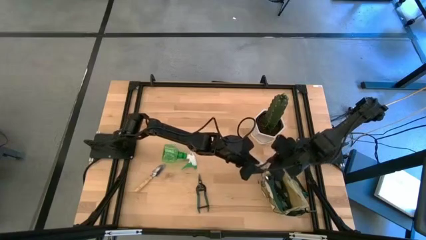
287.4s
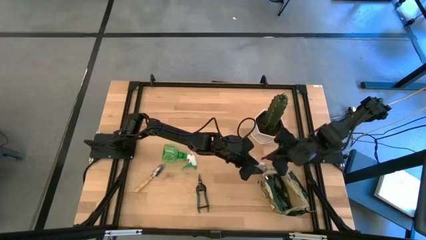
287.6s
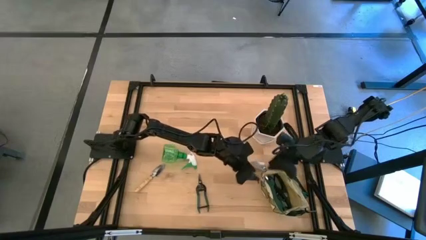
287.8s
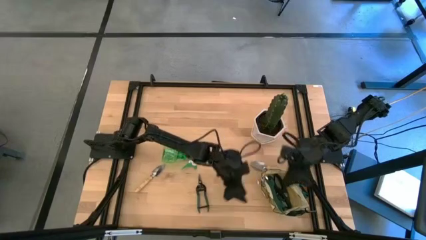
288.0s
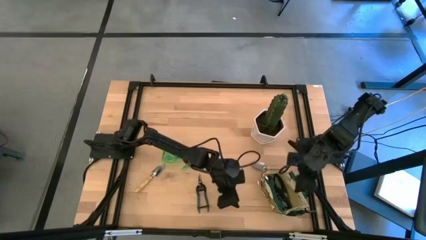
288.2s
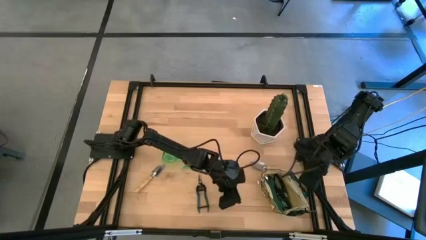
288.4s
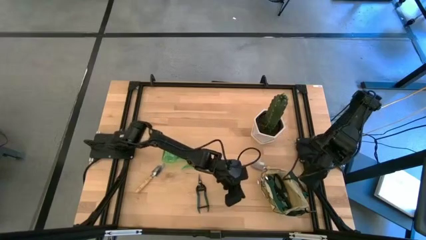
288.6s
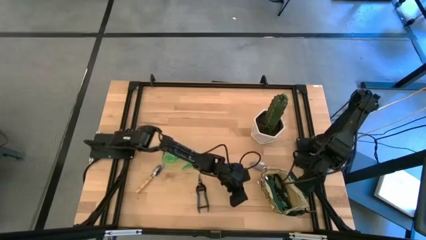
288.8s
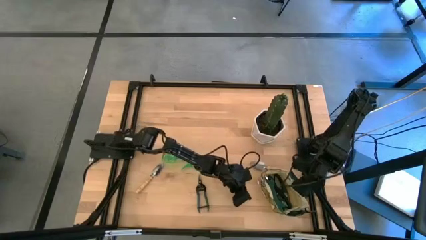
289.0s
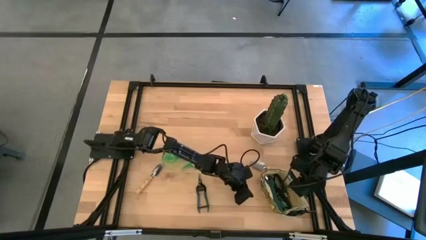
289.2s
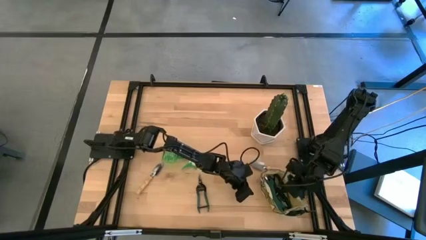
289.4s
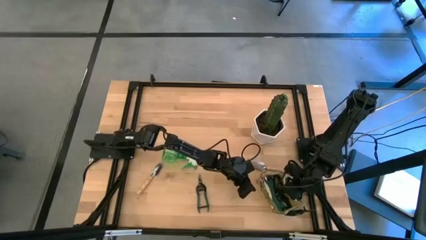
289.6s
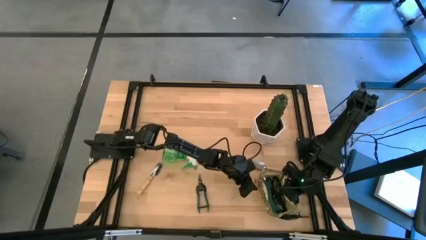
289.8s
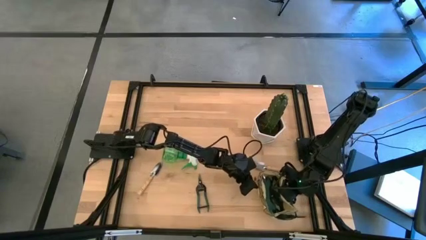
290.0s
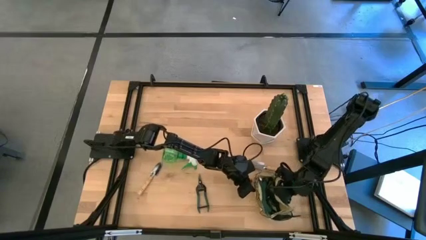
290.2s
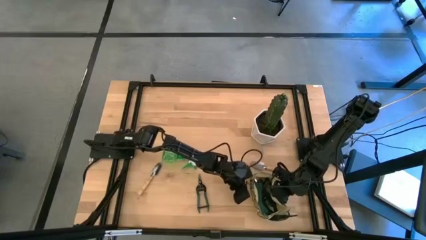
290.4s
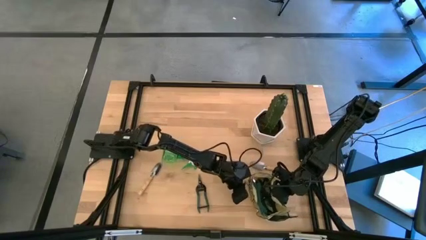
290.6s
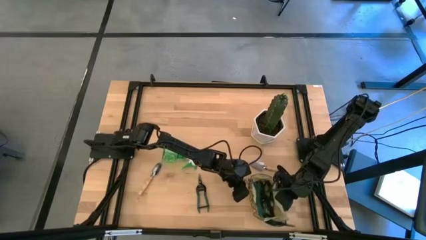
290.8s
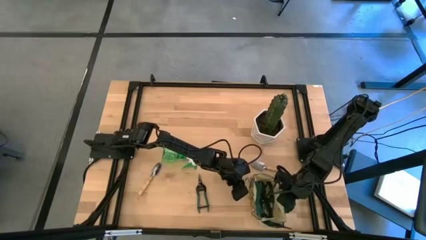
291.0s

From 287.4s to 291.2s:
Task: Pick & Place Garden tools in Gardening bag
Adjust the white bag

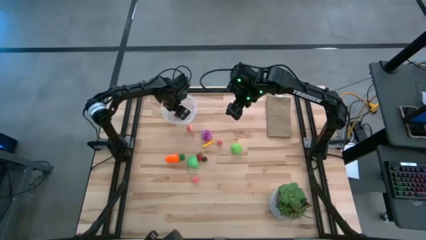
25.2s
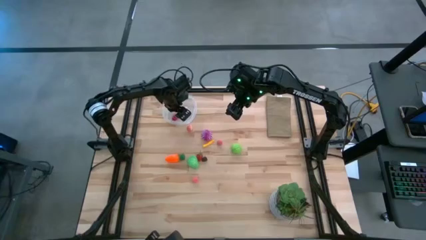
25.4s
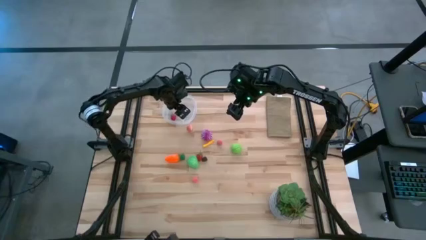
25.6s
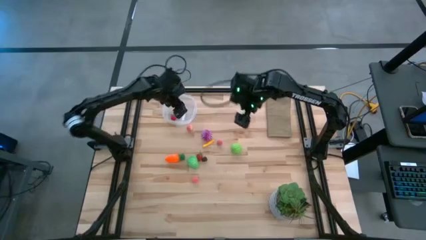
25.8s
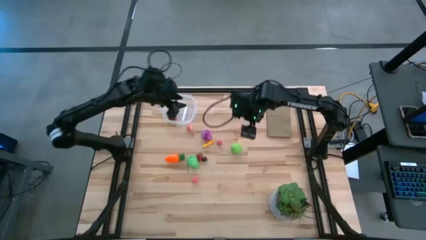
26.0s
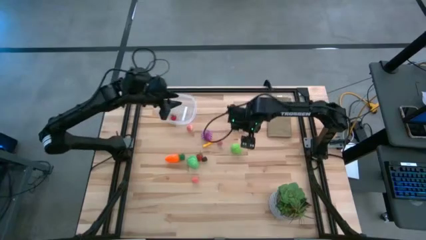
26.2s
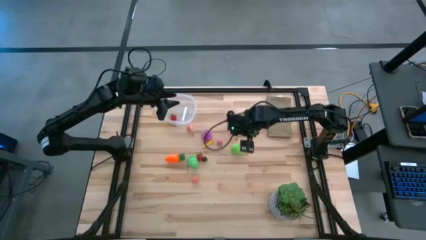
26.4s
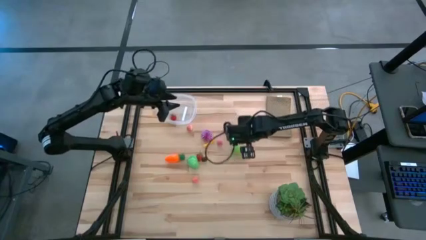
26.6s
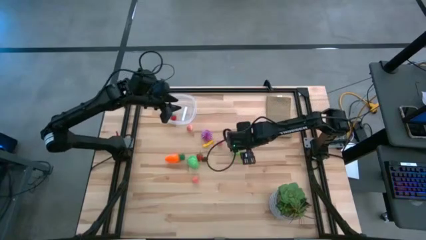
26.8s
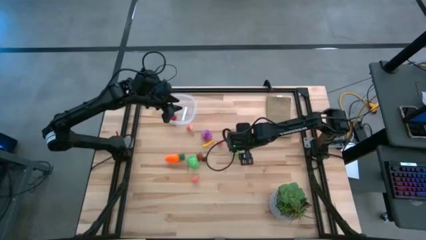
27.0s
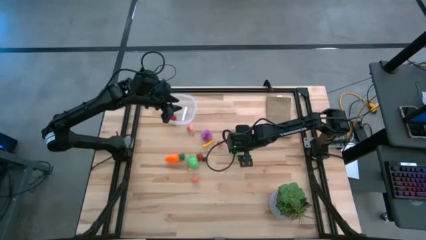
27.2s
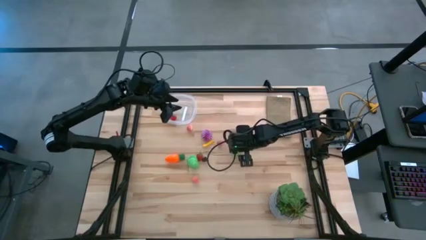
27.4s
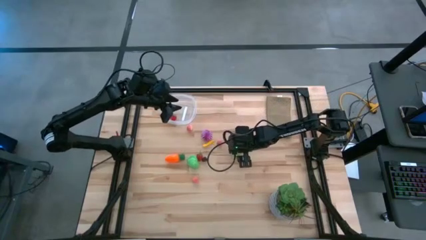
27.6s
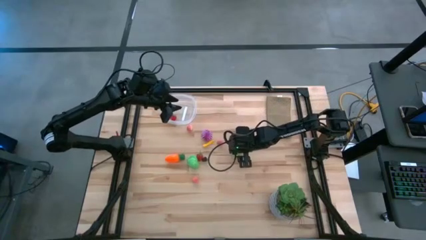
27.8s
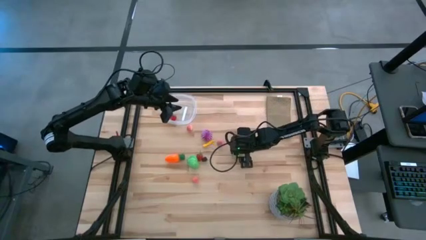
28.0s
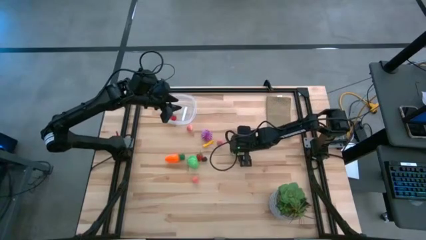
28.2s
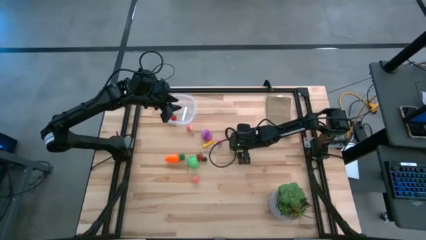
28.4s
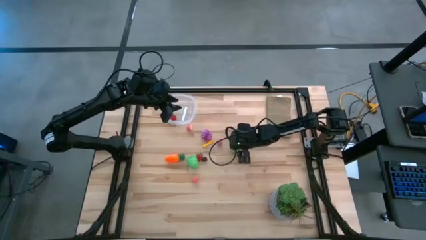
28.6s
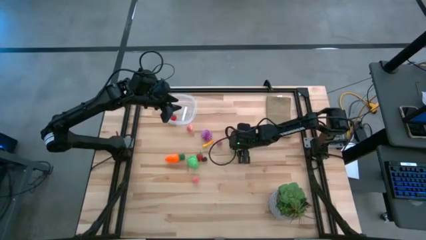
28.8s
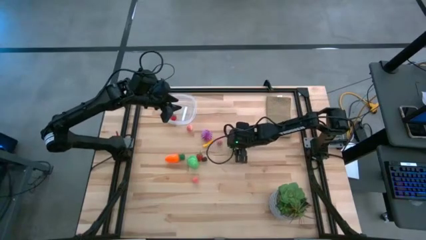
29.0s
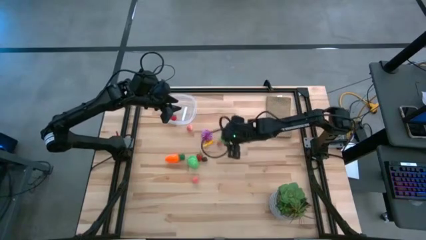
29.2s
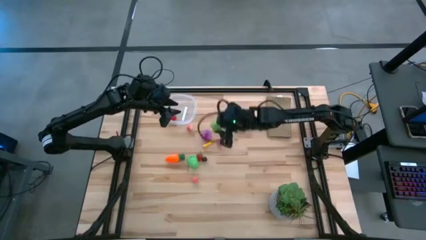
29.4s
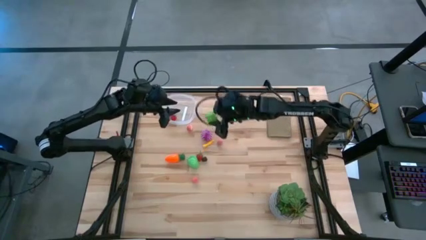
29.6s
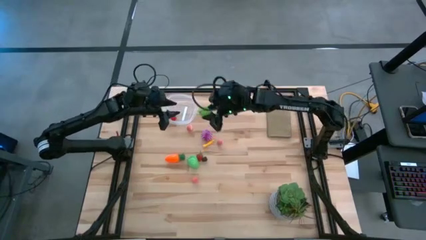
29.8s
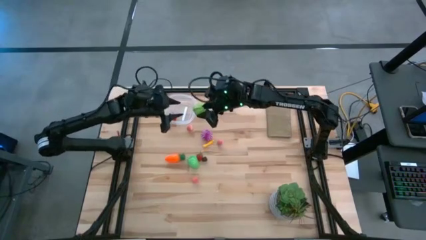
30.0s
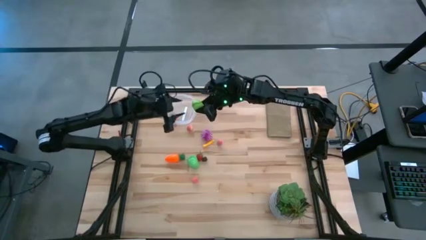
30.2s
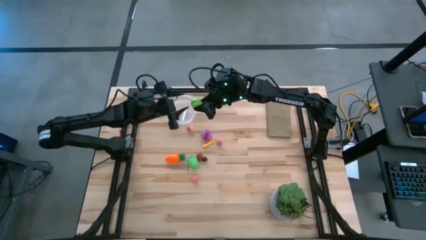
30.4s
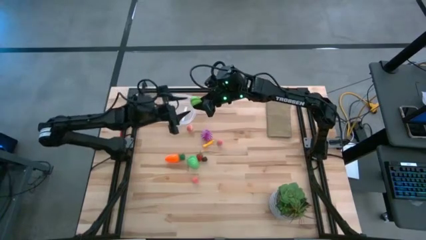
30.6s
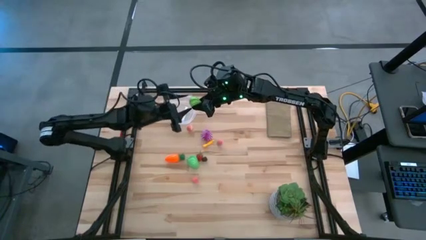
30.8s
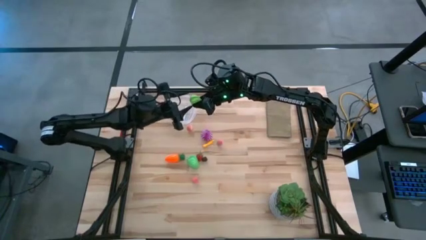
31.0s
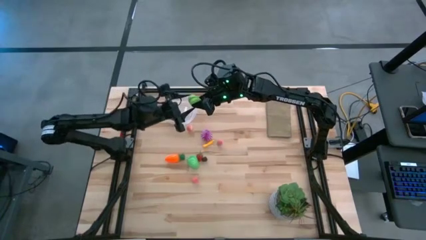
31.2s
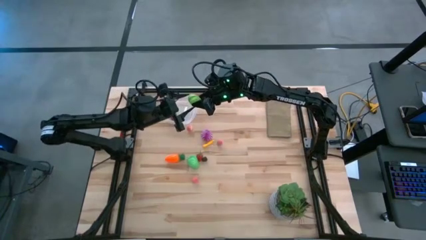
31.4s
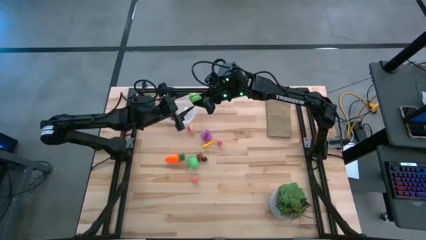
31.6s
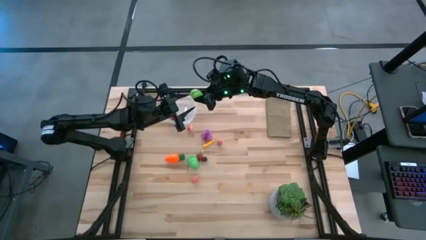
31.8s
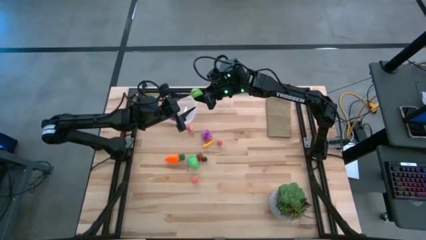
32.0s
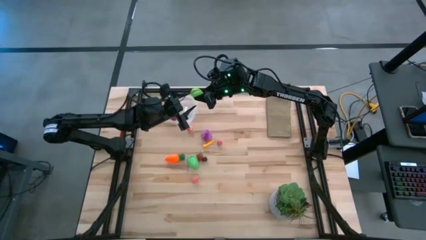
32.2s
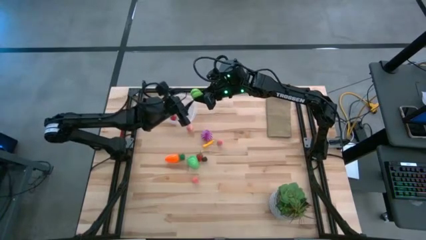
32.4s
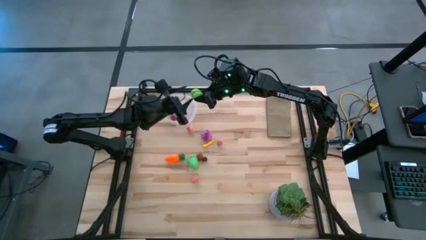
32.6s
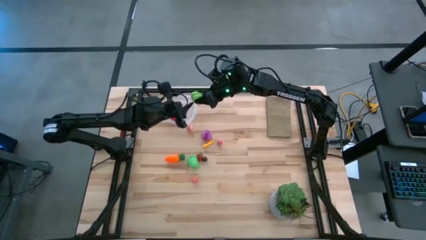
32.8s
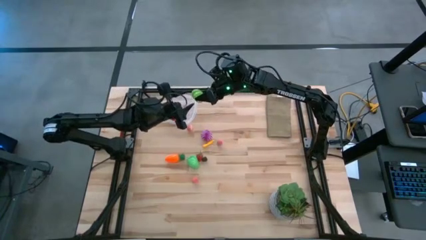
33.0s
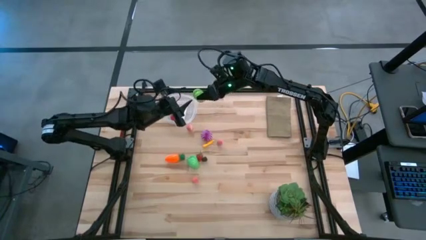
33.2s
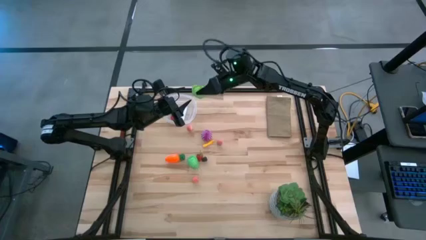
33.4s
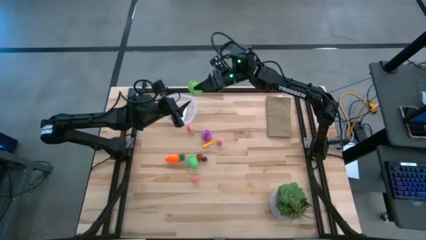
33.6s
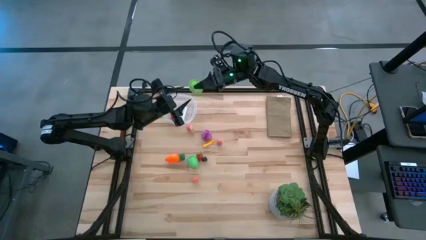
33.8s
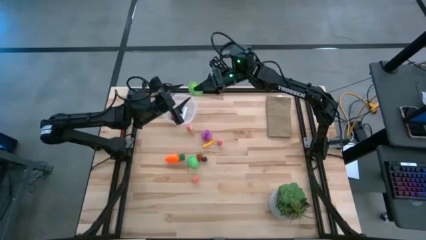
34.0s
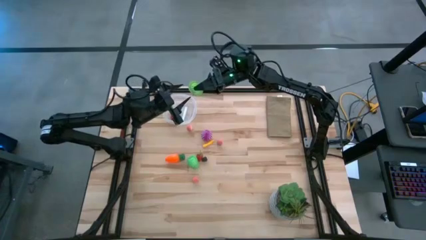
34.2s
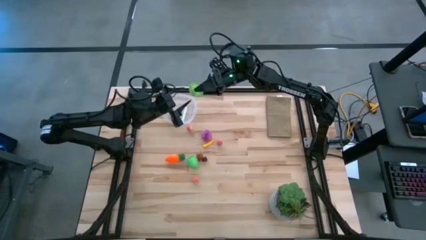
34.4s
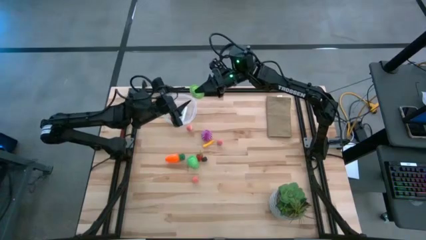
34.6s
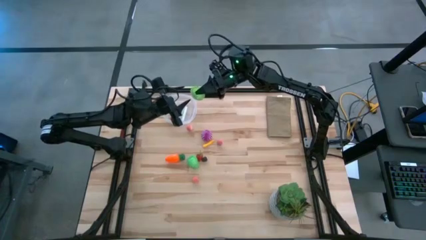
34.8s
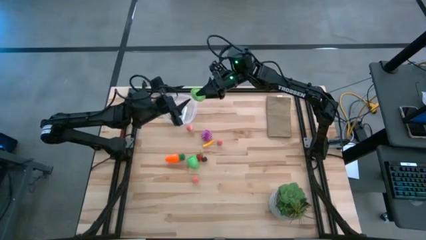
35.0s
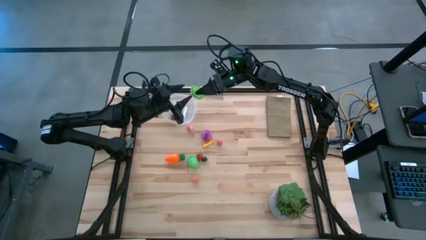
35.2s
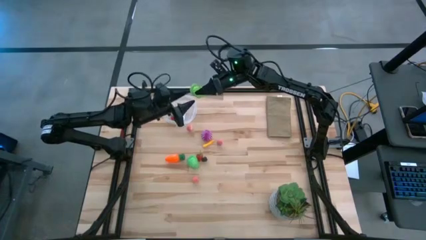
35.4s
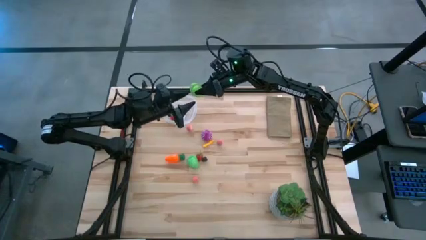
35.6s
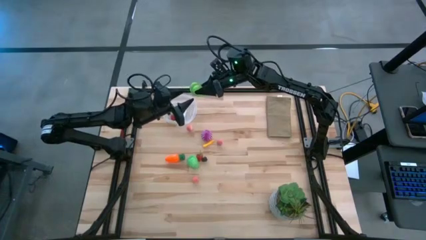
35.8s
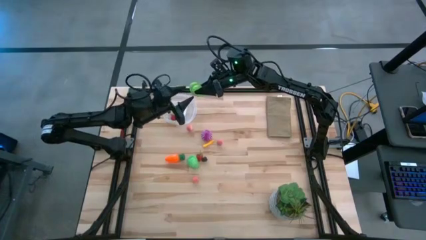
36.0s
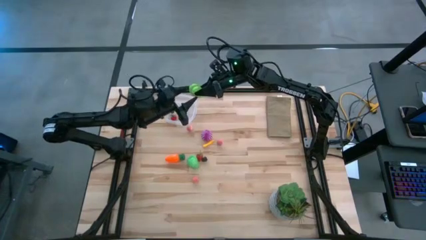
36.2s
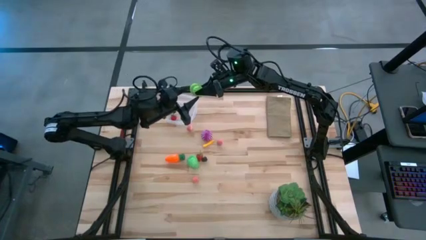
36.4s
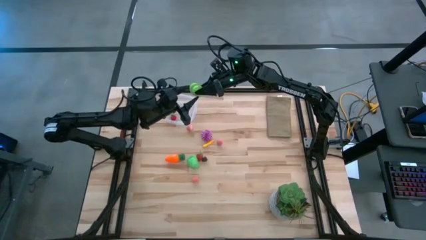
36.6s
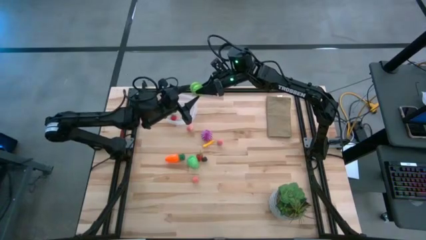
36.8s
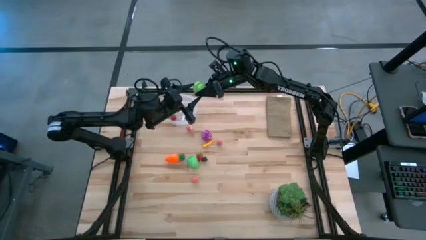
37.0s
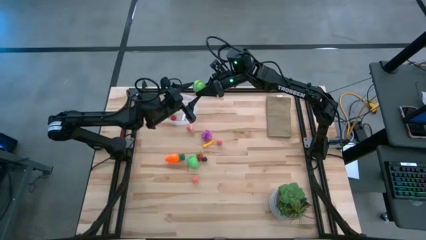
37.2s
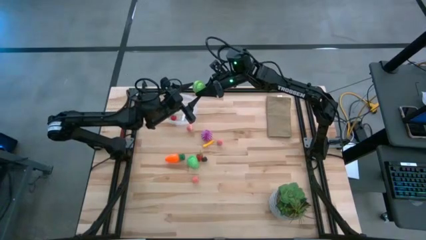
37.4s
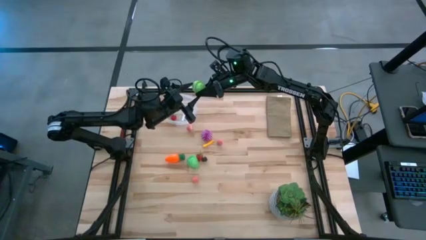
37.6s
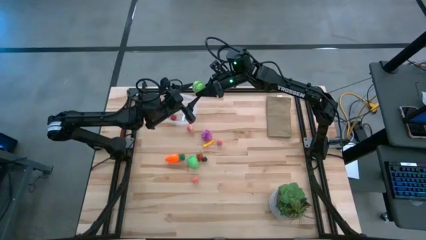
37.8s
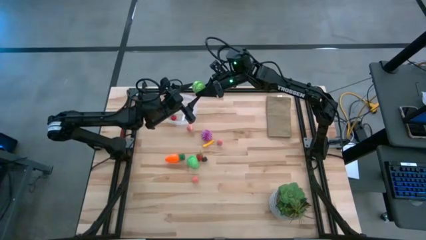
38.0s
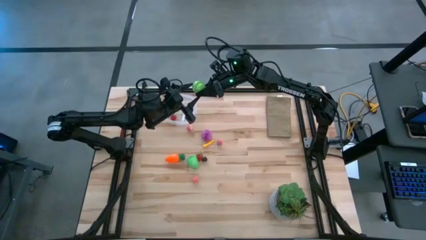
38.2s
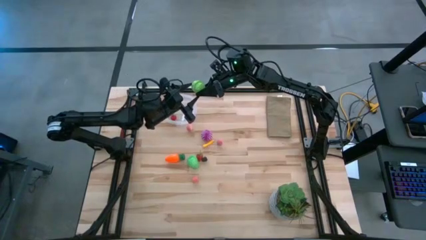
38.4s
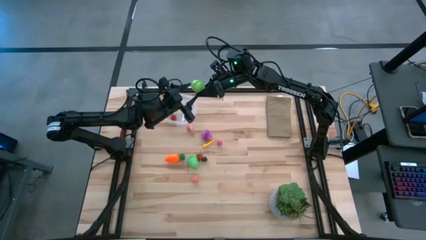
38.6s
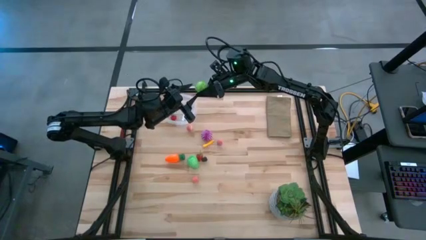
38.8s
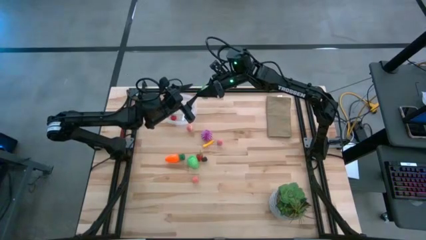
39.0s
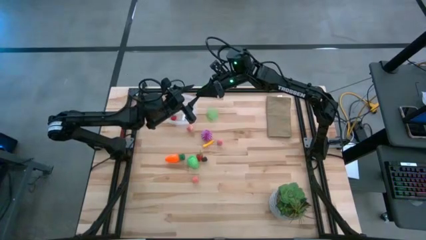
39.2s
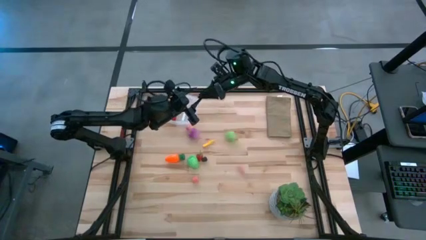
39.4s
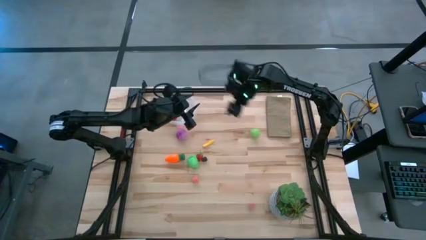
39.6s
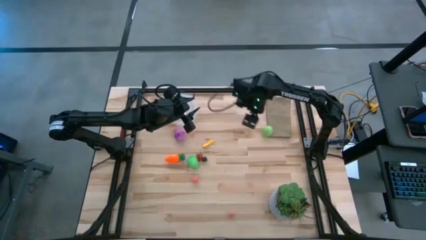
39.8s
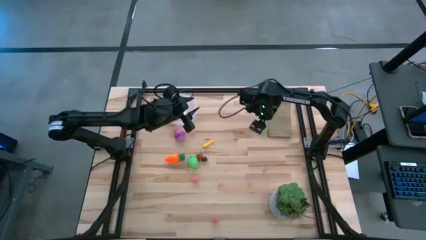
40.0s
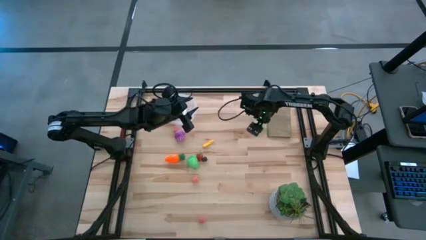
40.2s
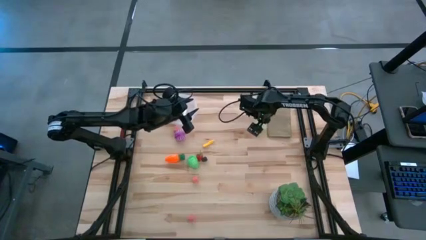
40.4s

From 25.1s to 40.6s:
Task: Pick and placing Produce into tupperware
Put the cabbage into the transparent bin
